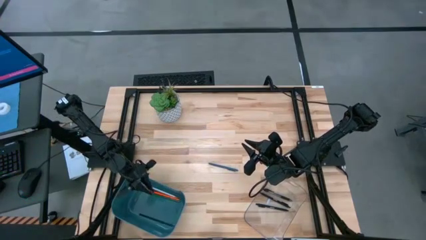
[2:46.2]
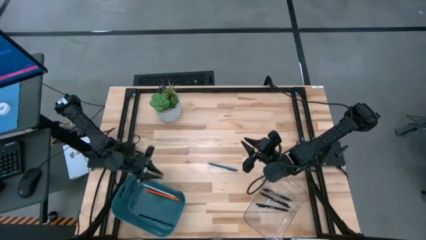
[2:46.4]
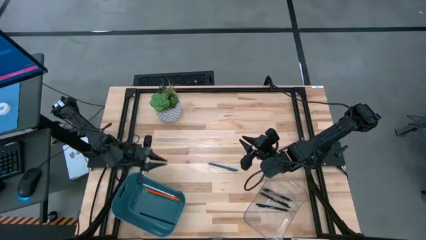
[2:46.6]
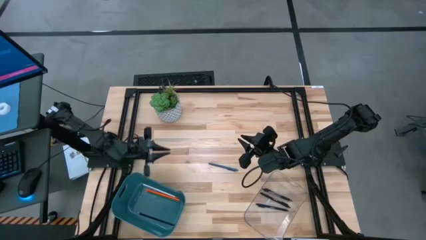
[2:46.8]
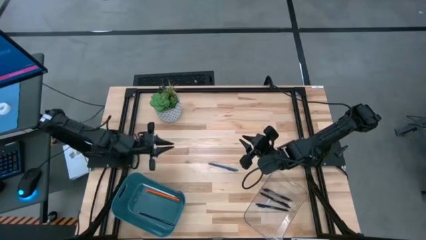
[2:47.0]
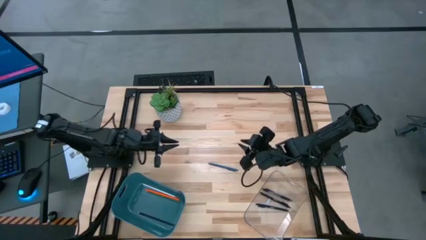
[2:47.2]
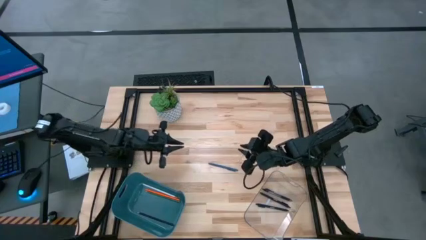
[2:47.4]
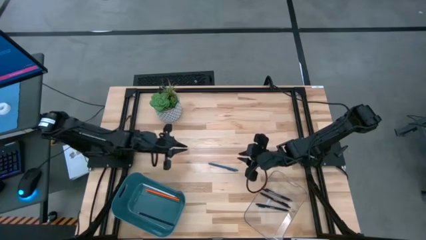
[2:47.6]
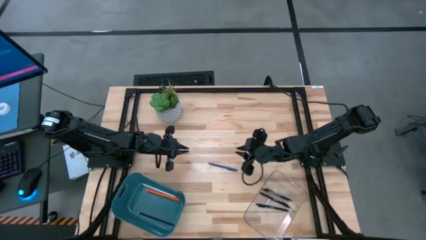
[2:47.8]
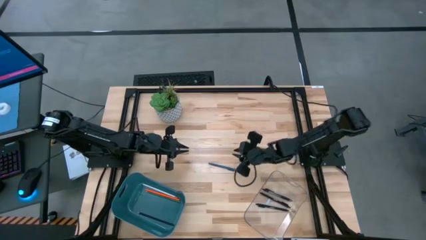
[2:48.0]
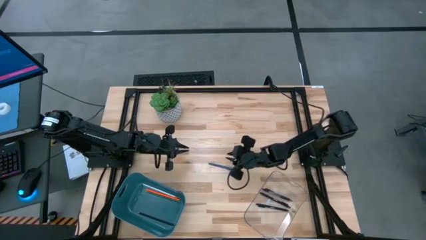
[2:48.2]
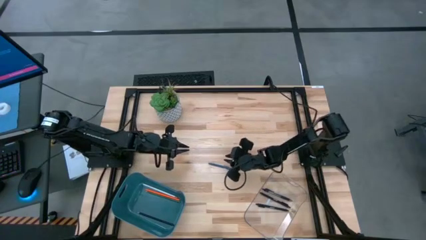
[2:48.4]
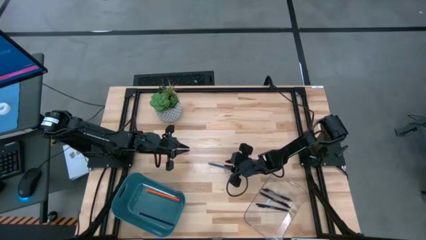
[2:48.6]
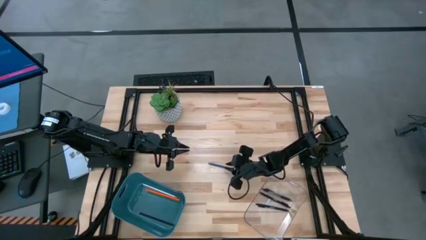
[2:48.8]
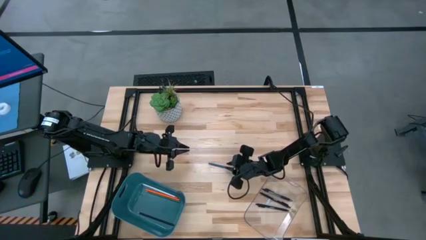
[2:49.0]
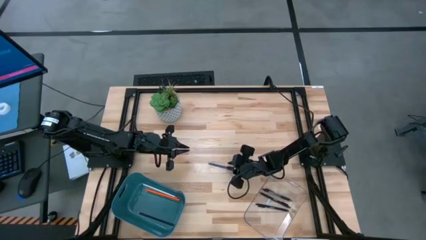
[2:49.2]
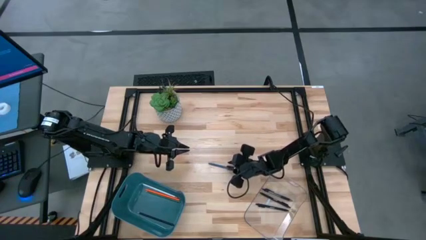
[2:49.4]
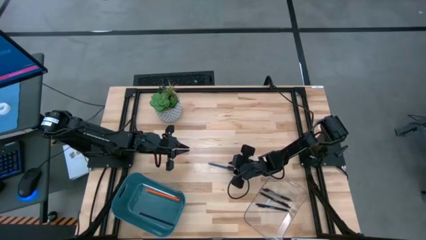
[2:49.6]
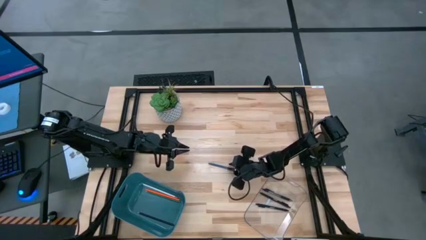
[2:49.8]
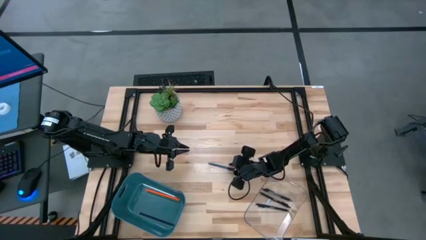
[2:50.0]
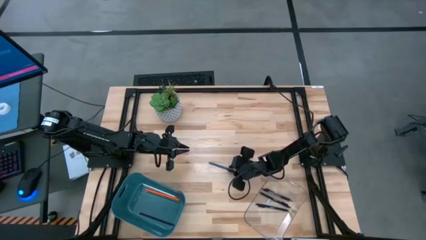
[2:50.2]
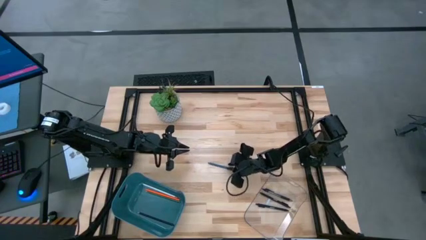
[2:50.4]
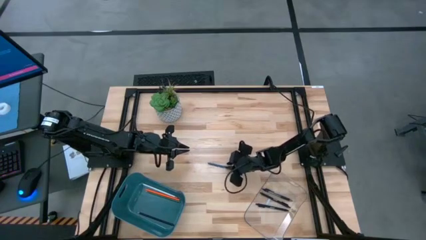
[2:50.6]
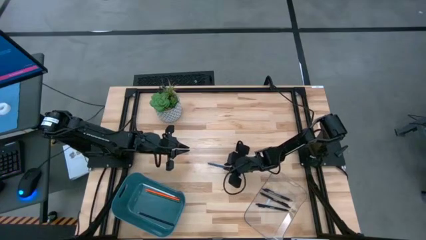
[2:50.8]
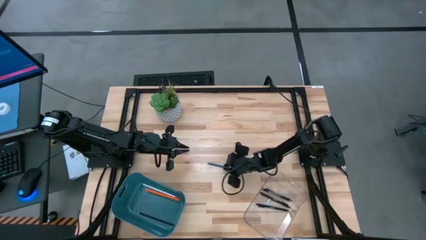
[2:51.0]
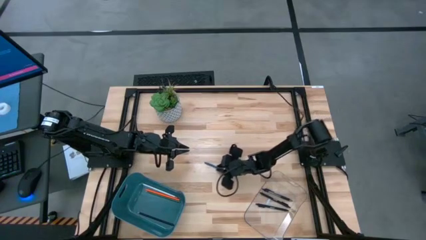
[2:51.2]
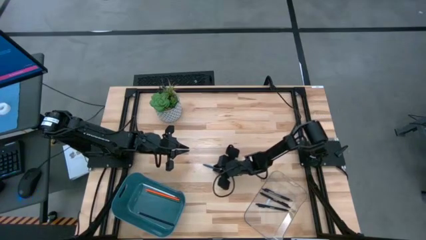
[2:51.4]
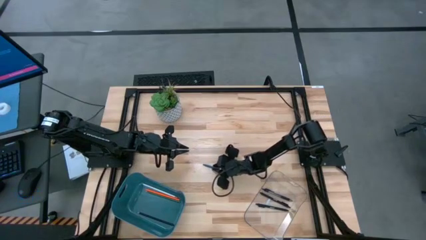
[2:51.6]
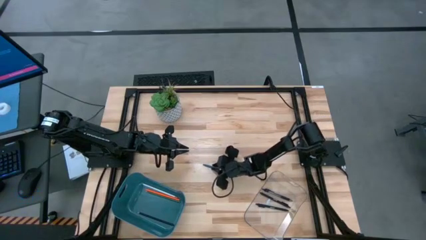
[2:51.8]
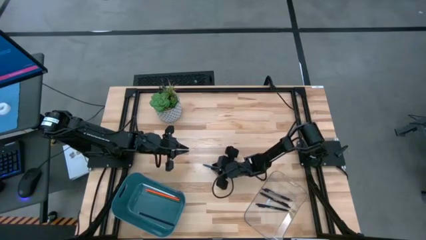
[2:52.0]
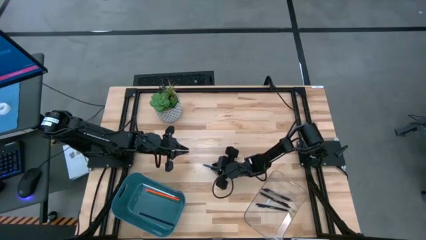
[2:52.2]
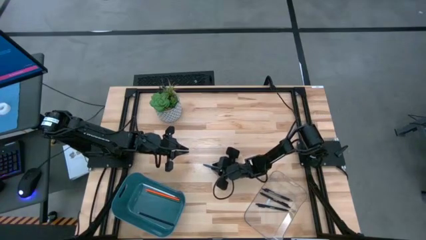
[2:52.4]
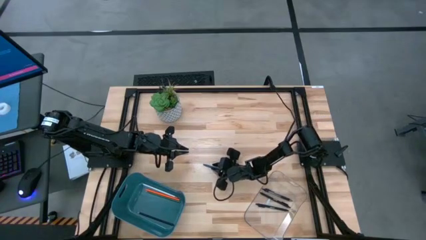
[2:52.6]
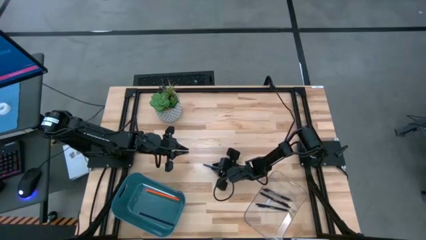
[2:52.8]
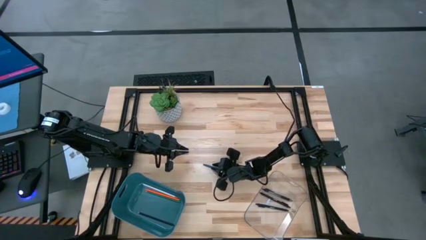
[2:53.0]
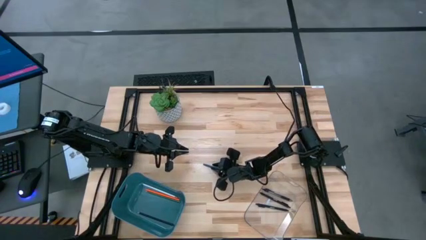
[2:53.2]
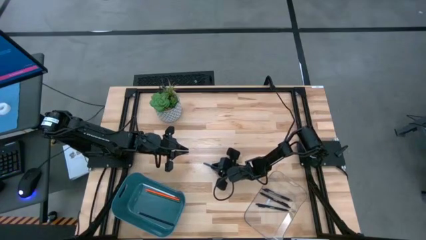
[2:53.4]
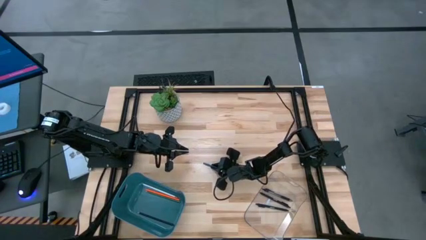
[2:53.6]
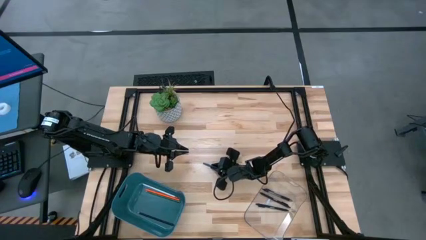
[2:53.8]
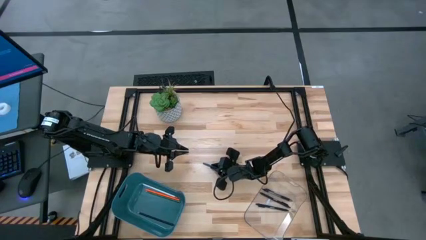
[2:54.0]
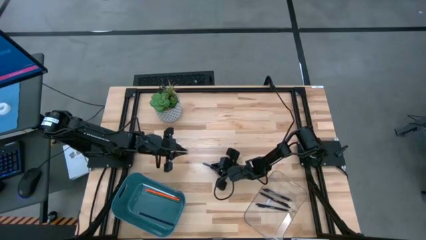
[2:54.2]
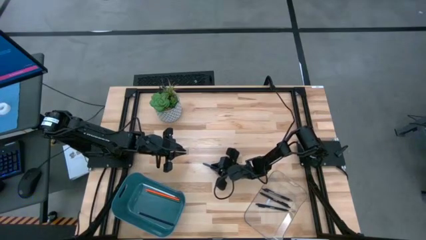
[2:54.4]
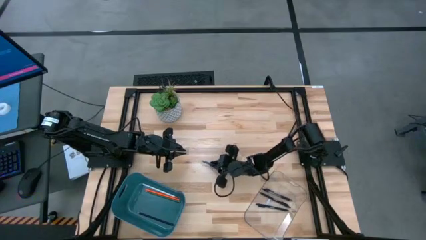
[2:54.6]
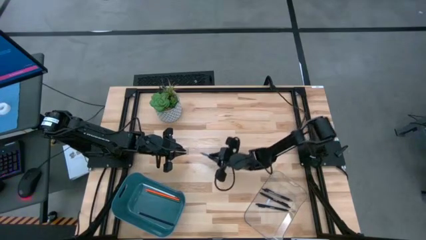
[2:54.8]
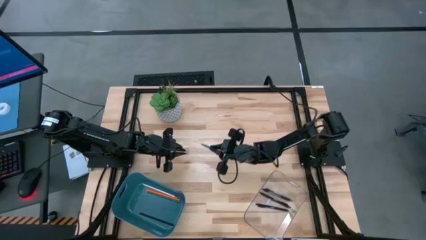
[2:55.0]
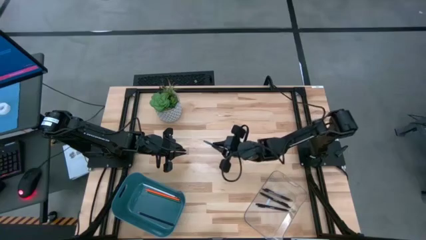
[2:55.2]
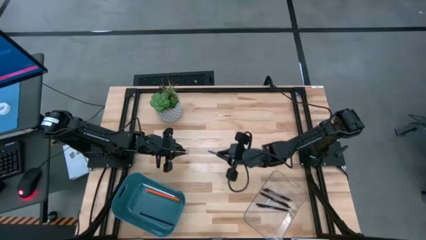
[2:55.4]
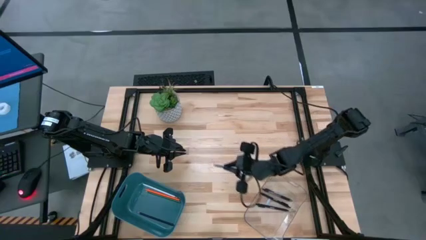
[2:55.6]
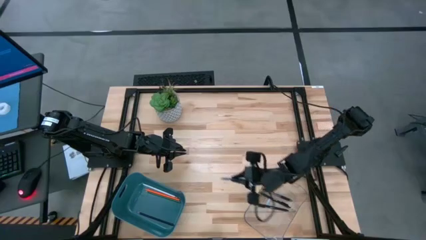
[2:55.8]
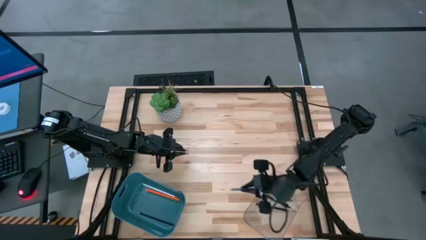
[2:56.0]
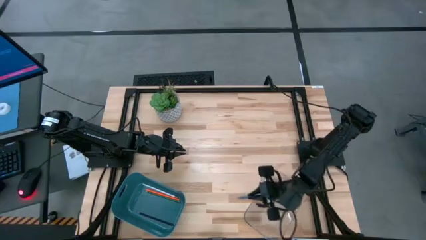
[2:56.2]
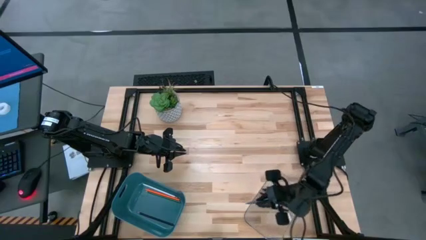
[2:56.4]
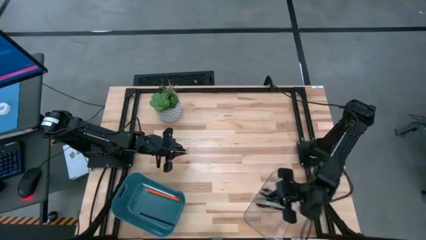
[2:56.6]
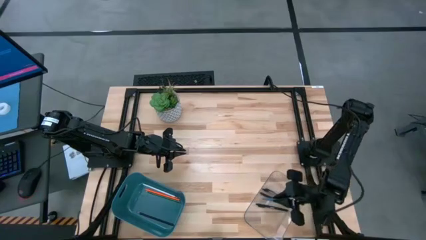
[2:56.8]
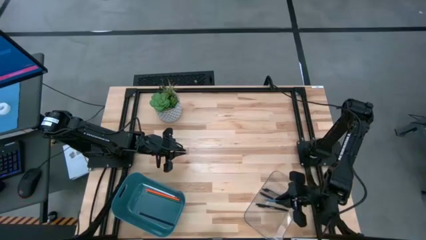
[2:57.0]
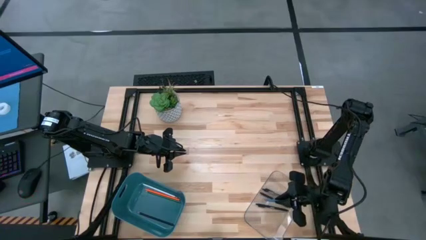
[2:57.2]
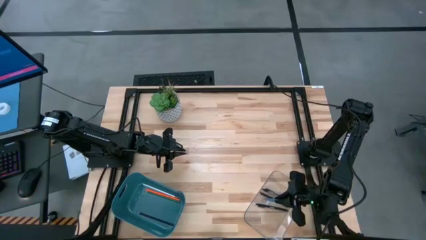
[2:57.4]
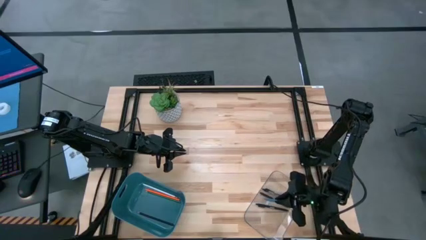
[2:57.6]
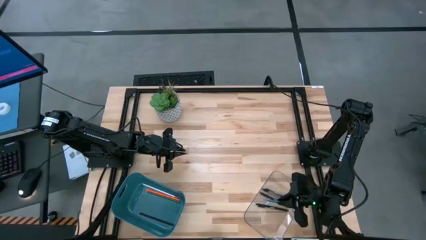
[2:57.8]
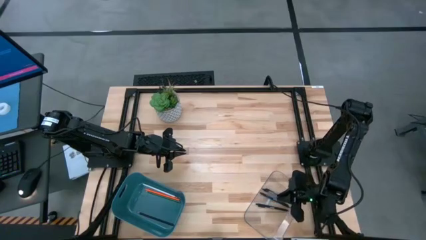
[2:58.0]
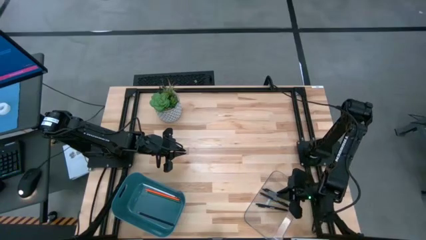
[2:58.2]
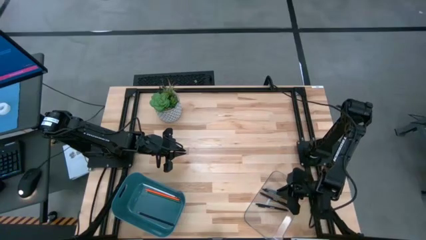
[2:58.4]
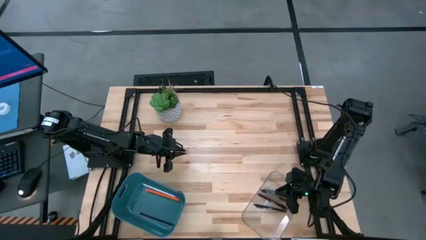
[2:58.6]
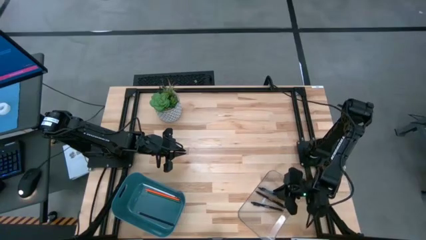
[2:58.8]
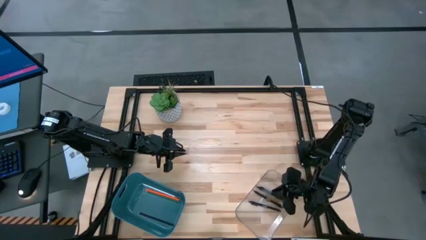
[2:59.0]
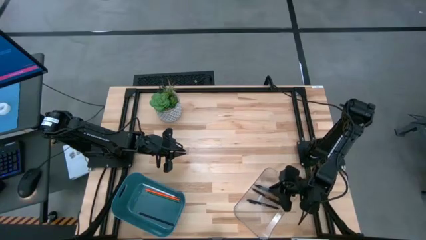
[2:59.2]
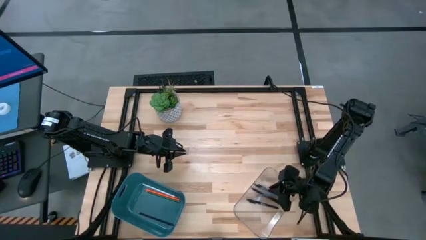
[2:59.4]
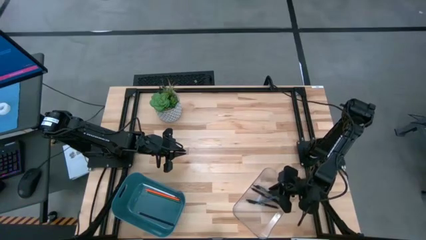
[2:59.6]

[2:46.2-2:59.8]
Task: Sort pens & pencils
Put the blue pen into the transparent bin
